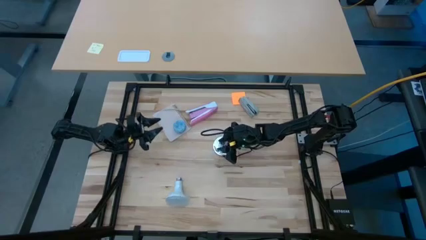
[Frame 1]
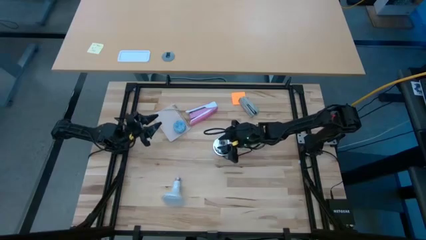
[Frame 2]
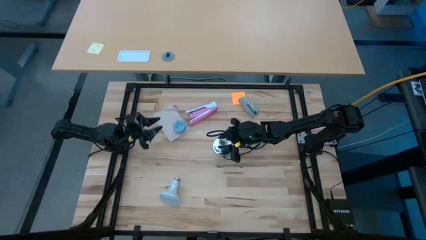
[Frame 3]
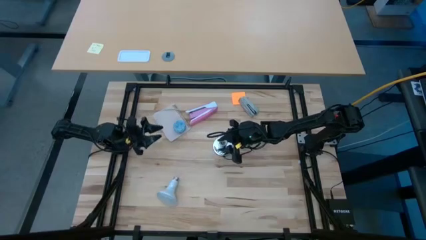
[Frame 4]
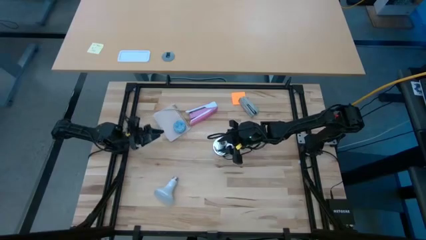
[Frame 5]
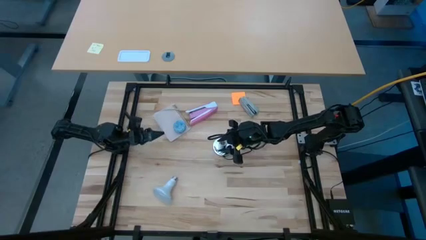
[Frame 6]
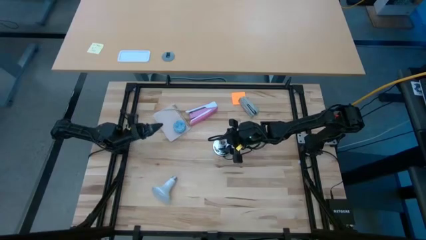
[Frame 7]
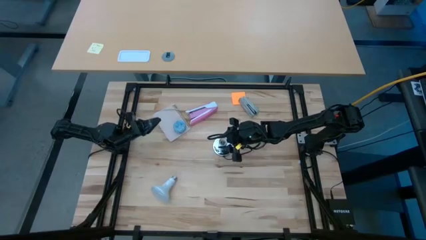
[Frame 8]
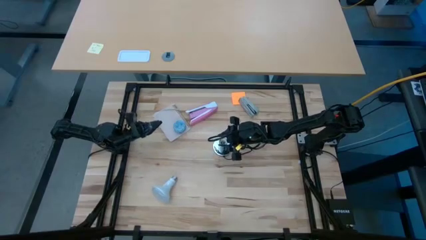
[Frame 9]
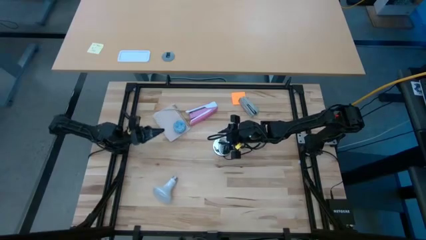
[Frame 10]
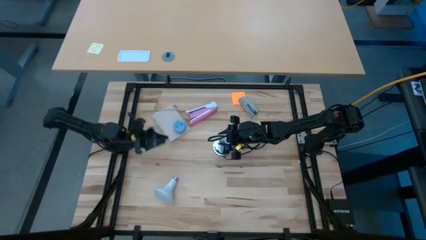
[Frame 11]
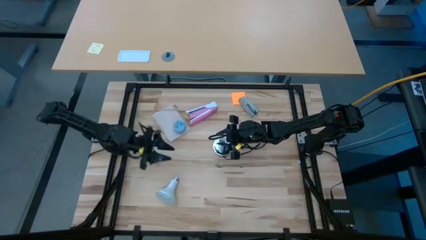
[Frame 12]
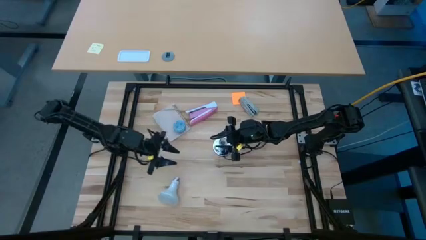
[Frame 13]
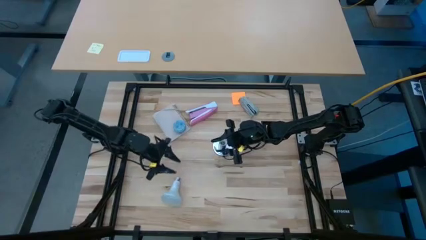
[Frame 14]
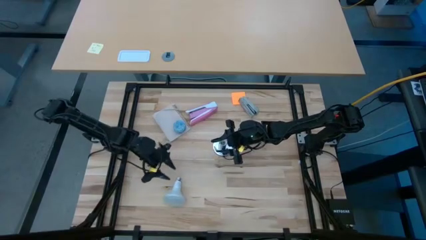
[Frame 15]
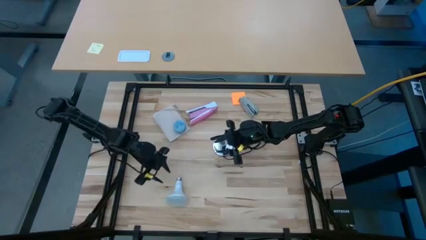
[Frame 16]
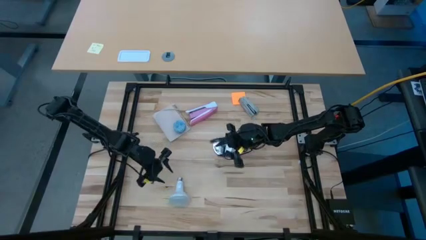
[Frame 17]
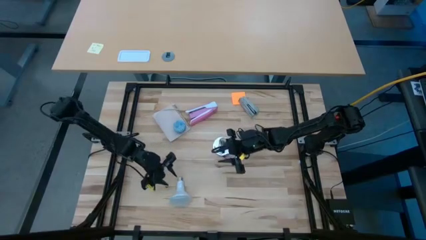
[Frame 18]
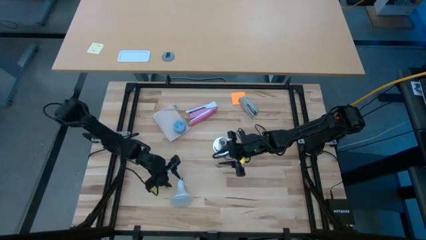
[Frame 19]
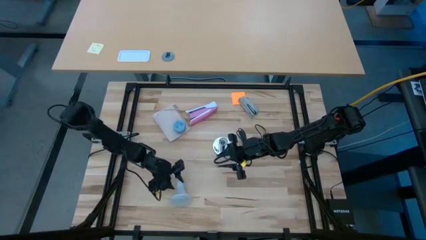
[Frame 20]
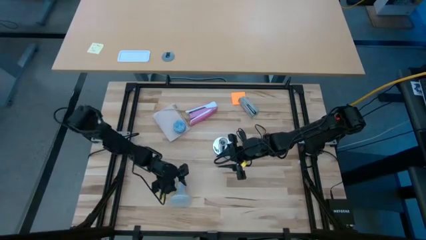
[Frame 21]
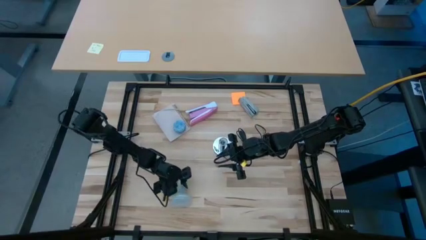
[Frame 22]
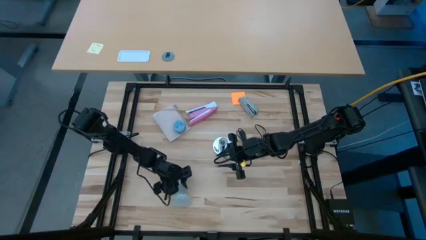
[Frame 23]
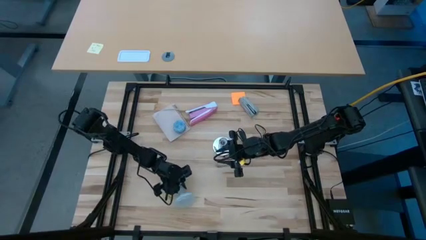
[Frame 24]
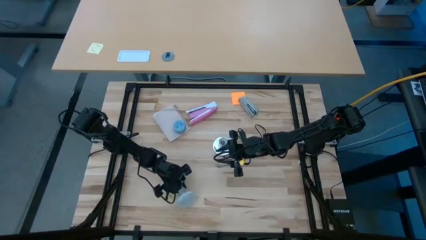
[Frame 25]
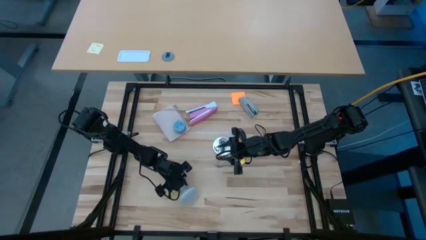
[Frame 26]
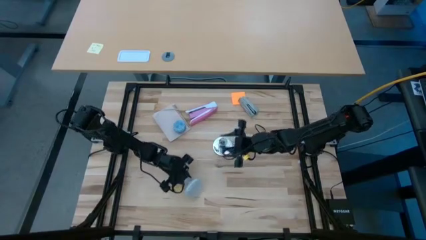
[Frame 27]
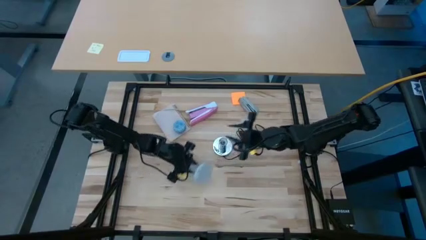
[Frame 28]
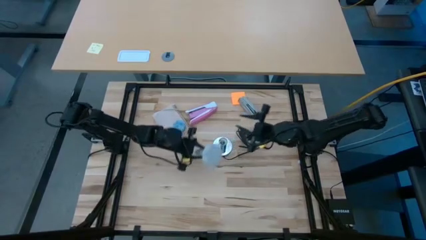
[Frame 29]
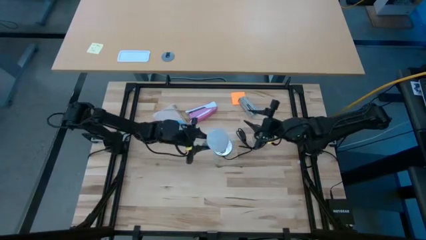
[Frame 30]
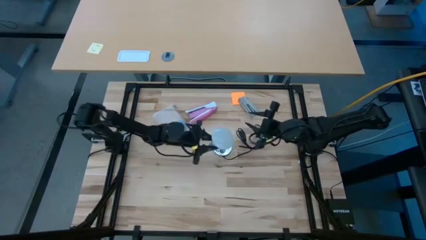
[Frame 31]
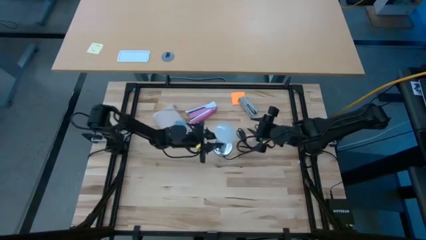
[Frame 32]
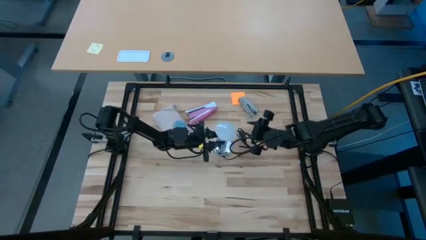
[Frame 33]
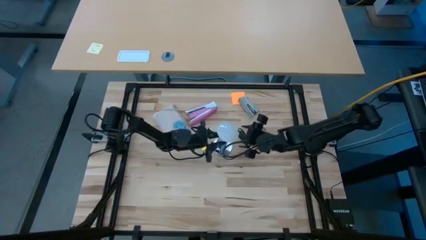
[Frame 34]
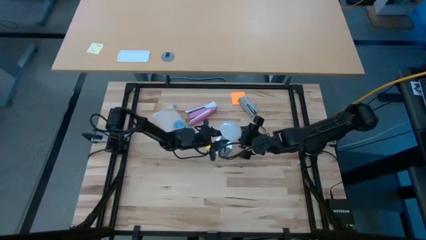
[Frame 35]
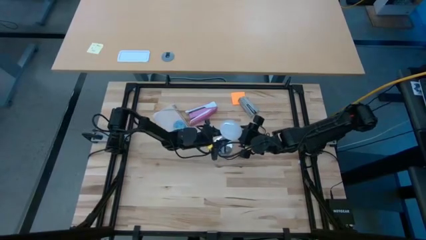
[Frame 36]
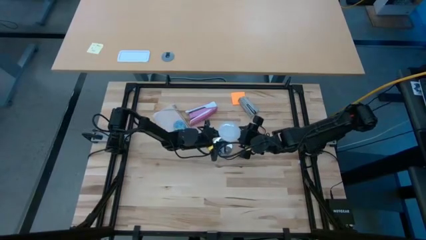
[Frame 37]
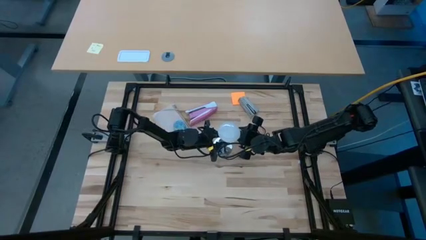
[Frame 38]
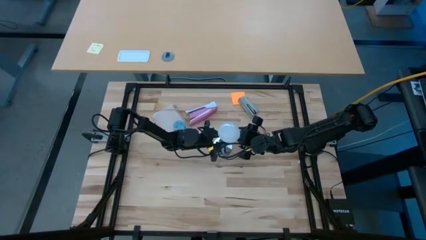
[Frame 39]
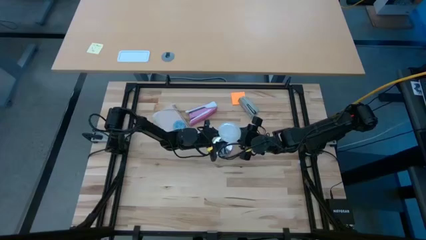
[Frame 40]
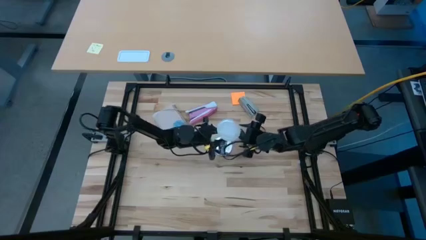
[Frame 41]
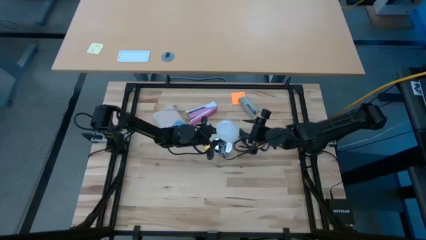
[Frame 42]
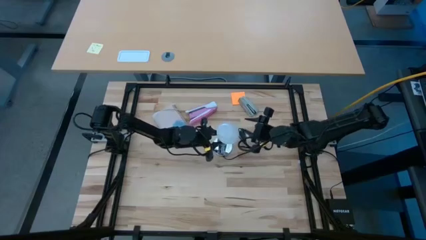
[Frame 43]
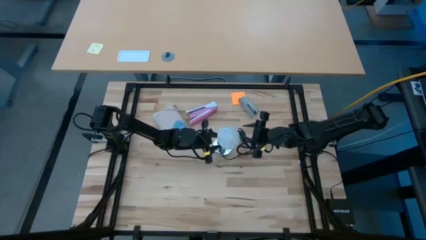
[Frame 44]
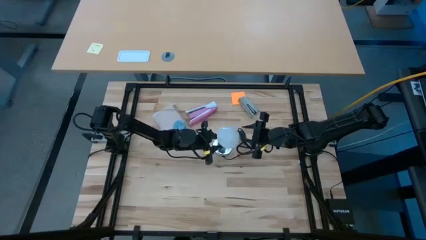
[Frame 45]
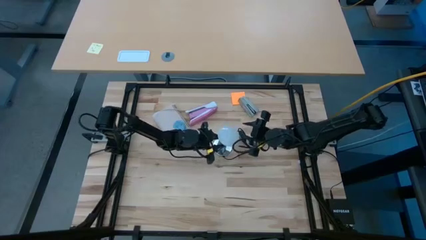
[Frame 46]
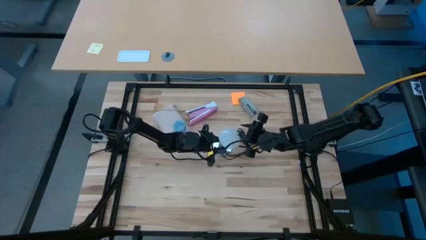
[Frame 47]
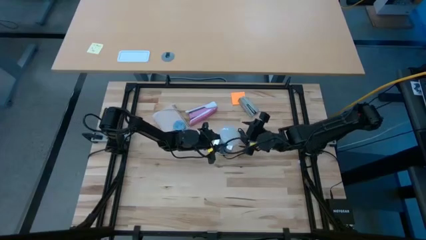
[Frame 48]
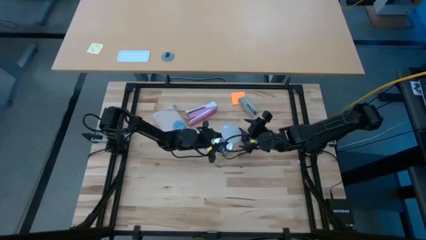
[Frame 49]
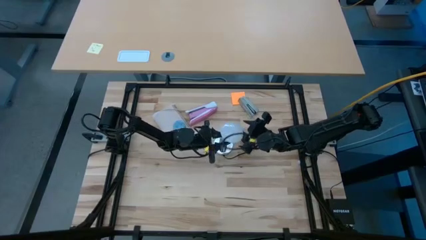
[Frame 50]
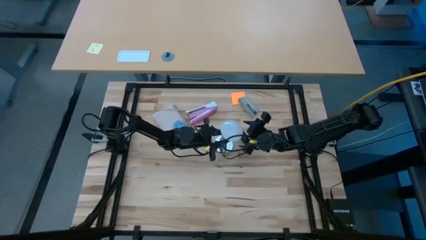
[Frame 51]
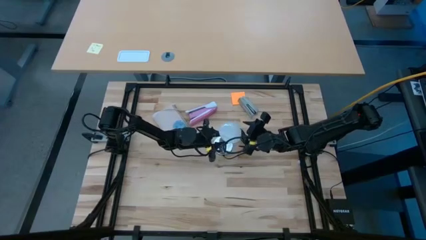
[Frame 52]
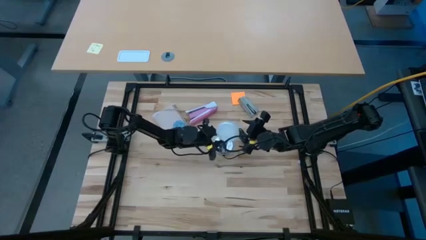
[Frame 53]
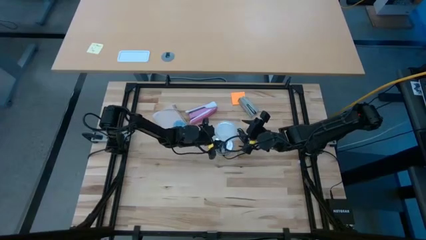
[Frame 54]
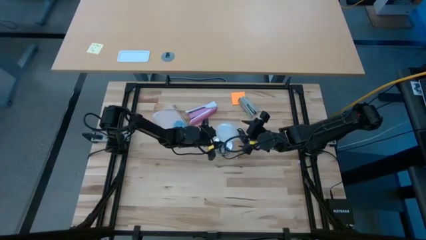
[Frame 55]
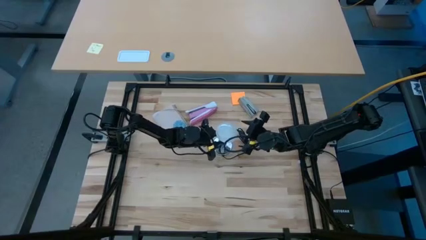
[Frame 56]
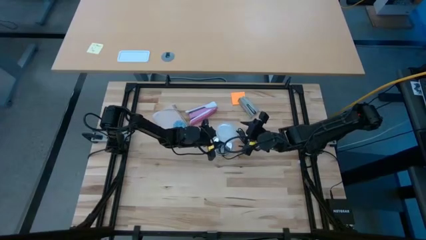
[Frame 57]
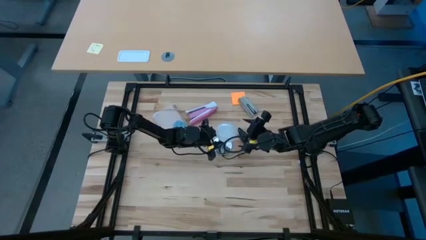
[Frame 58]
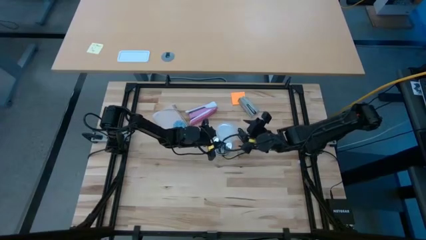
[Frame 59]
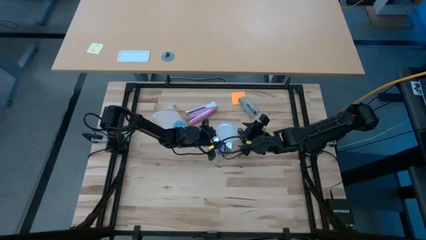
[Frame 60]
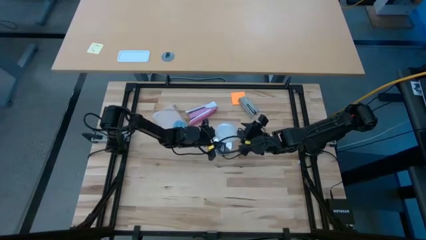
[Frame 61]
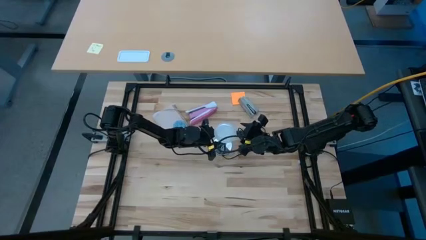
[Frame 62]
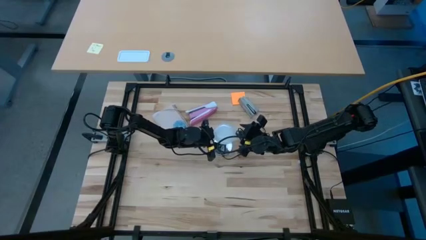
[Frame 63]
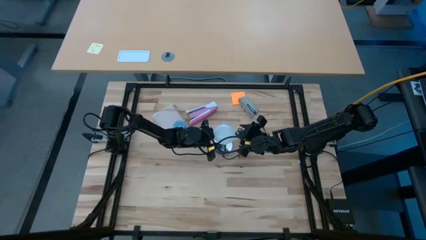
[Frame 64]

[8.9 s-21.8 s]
Task: Screw lightbulb
Insert the white lightbulb into the silver desk lamp

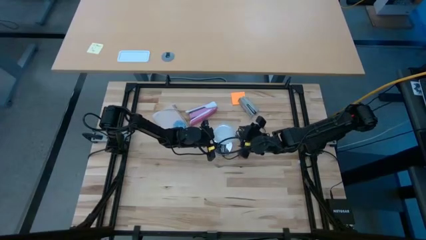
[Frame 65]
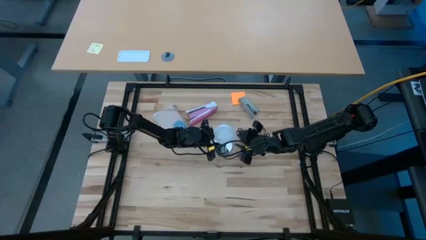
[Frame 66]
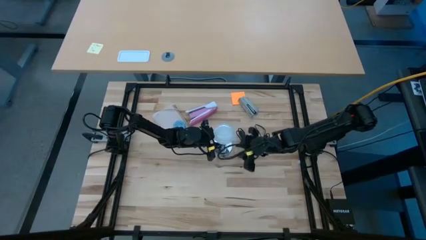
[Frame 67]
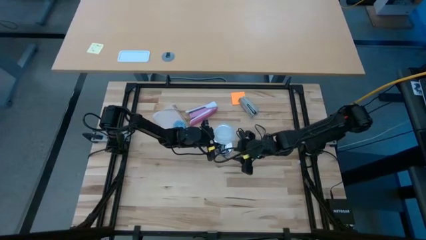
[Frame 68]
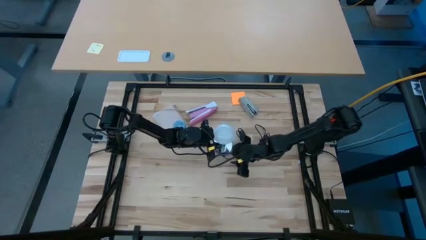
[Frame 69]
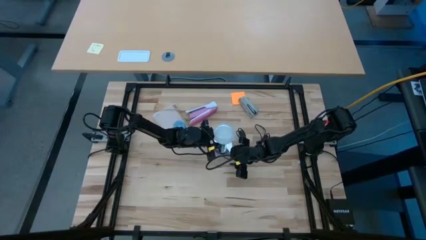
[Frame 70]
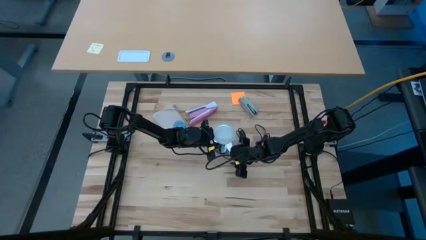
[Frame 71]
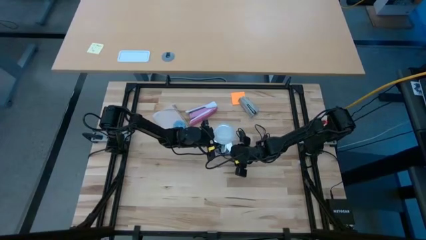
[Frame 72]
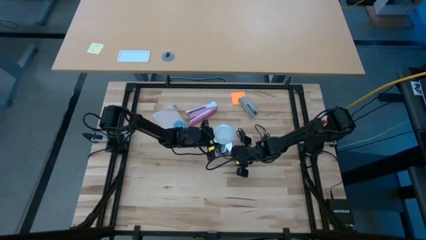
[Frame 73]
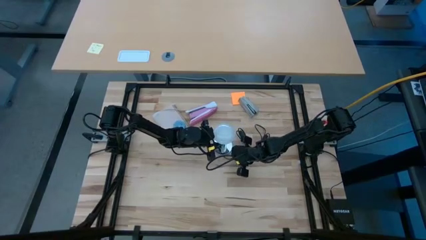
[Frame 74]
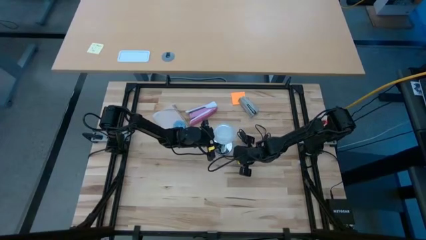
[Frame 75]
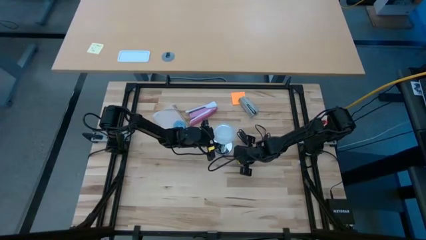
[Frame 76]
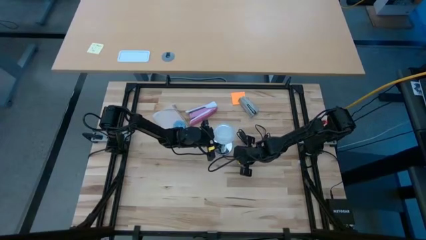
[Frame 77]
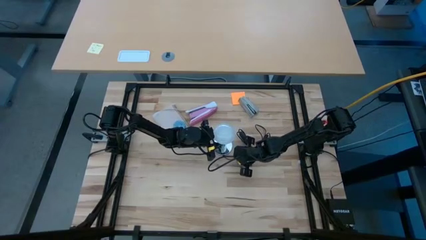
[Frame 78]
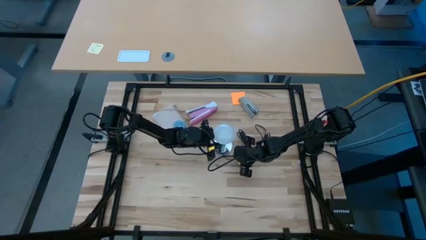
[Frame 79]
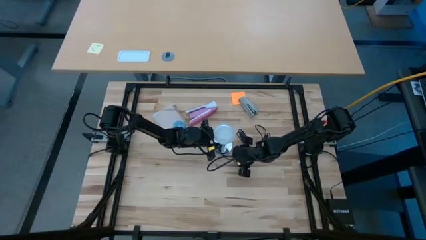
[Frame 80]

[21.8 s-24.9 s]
Insert the white lightbulb into the silver desk lamp
